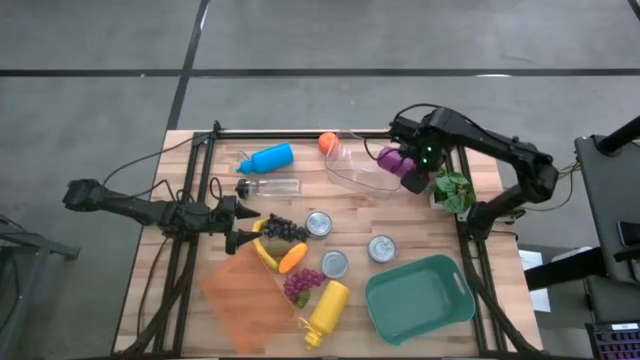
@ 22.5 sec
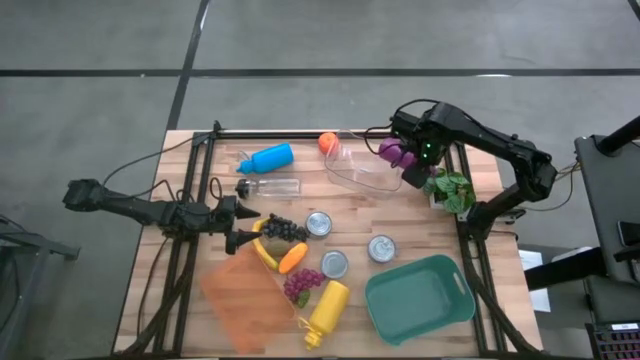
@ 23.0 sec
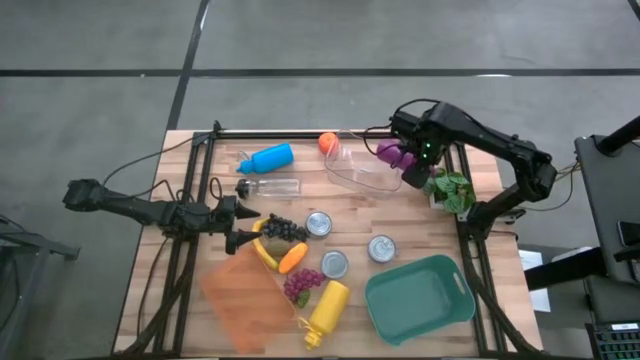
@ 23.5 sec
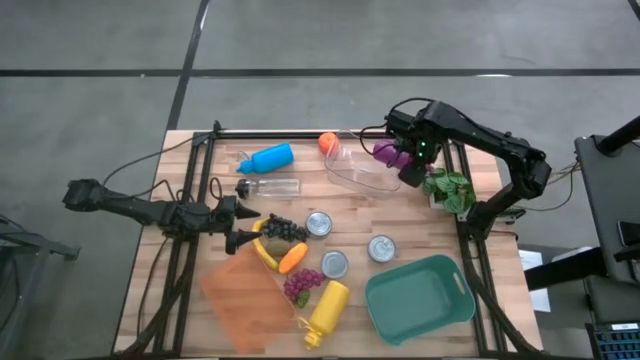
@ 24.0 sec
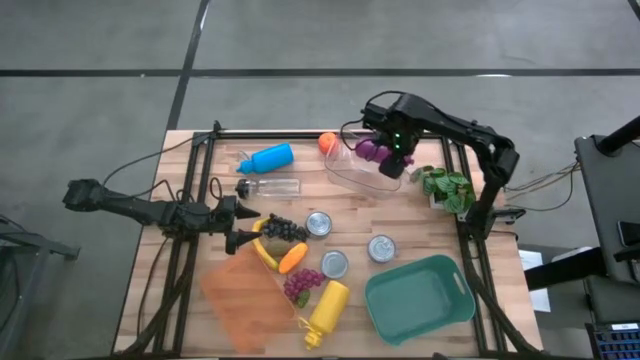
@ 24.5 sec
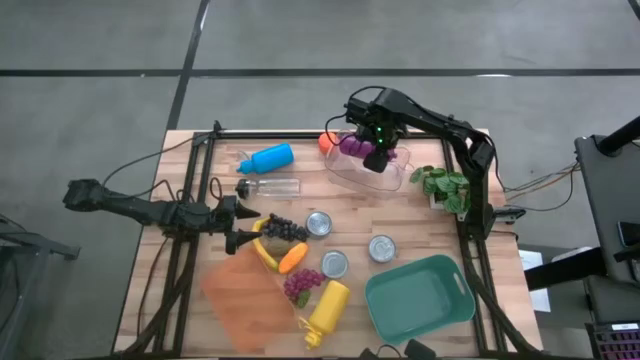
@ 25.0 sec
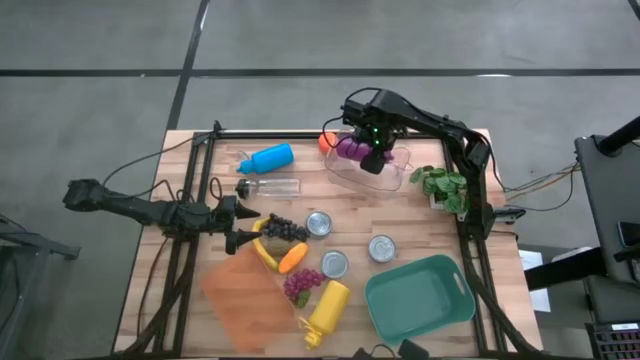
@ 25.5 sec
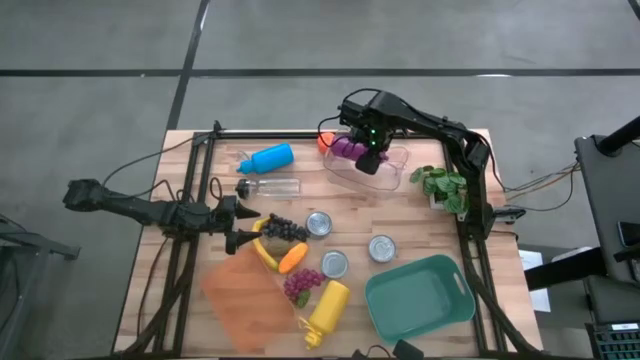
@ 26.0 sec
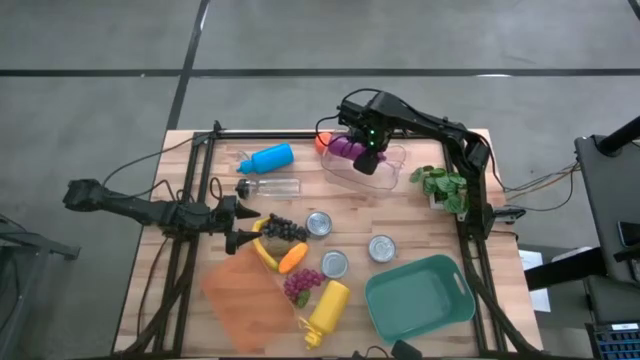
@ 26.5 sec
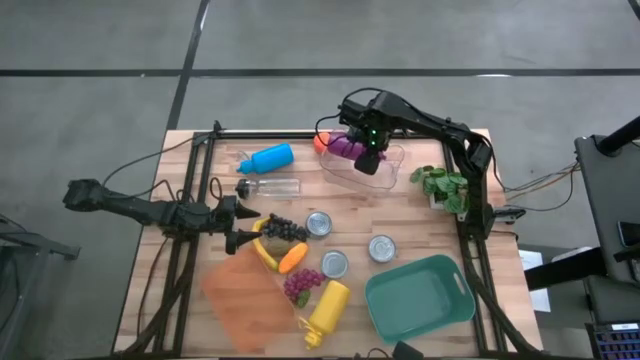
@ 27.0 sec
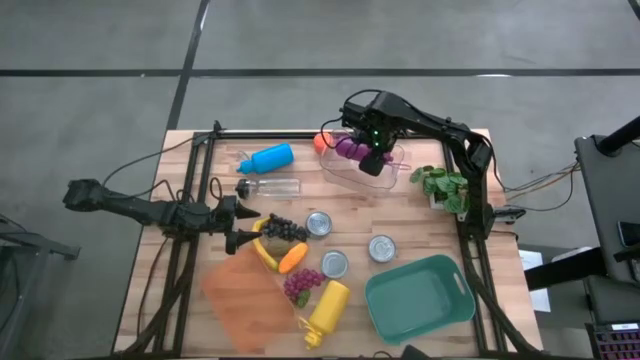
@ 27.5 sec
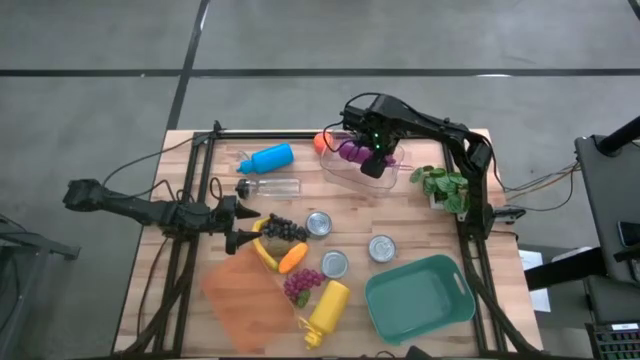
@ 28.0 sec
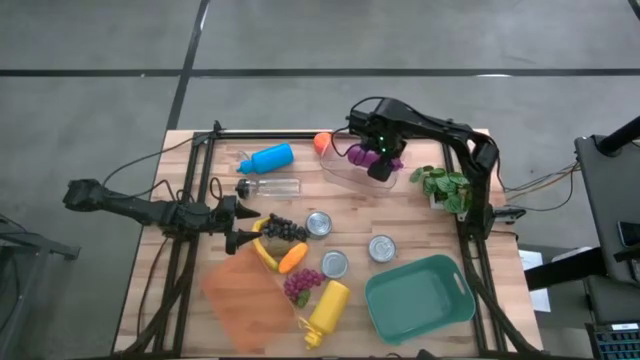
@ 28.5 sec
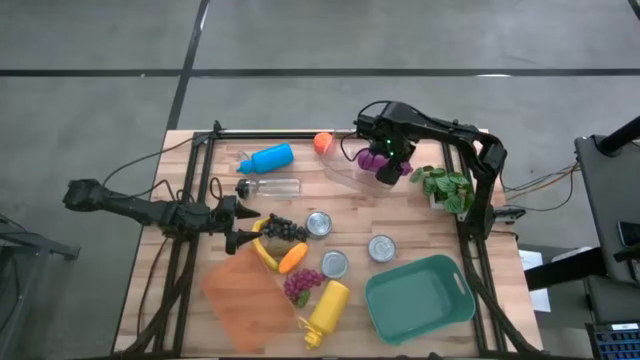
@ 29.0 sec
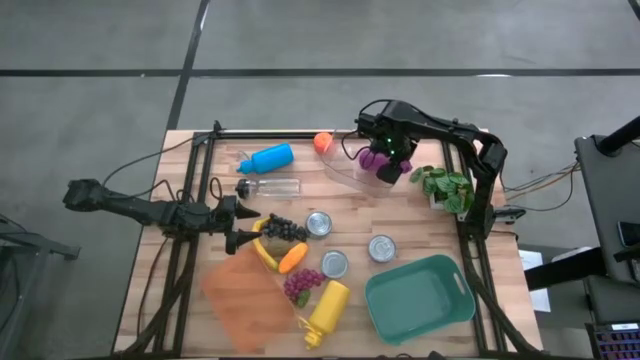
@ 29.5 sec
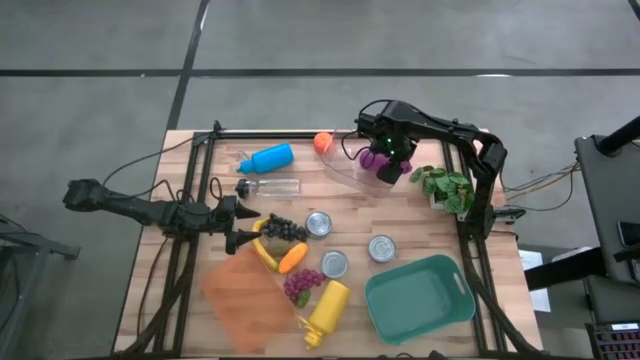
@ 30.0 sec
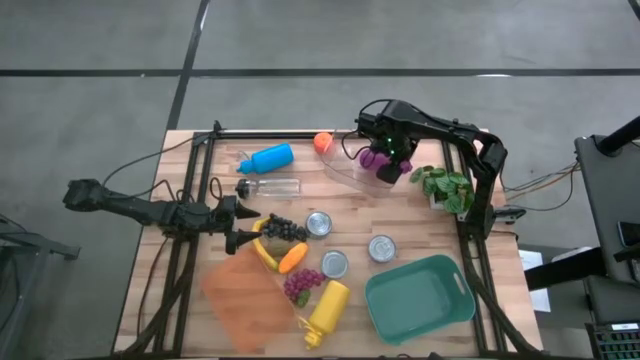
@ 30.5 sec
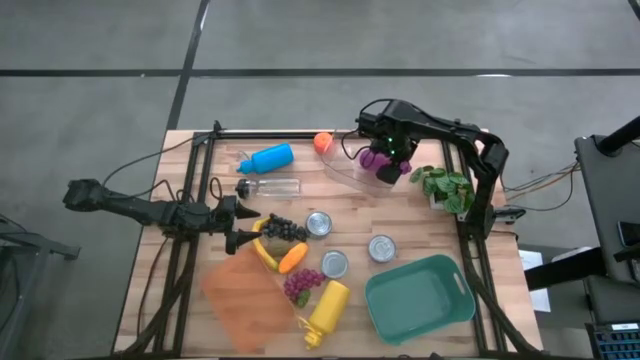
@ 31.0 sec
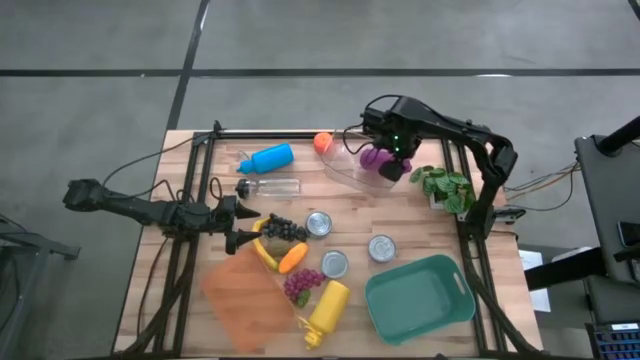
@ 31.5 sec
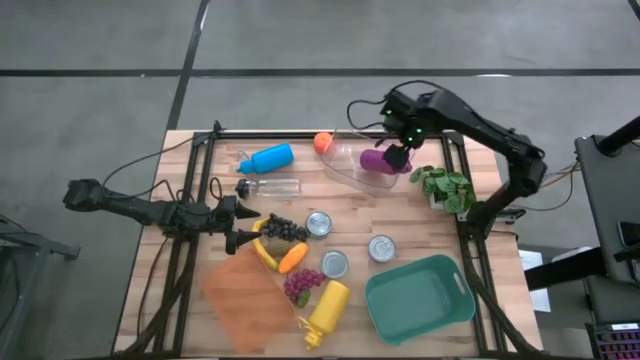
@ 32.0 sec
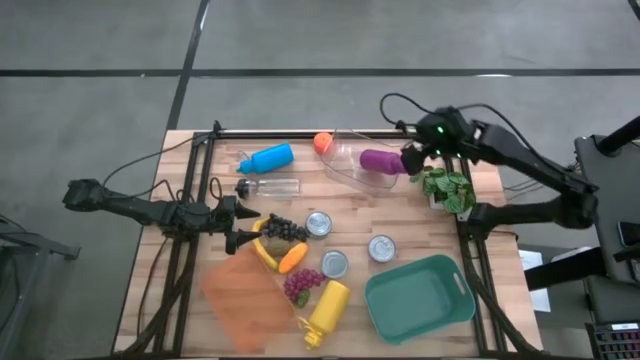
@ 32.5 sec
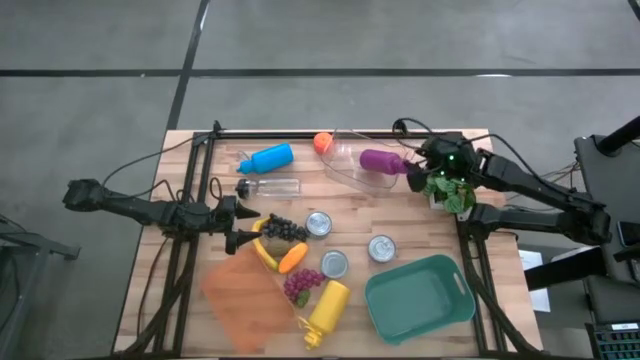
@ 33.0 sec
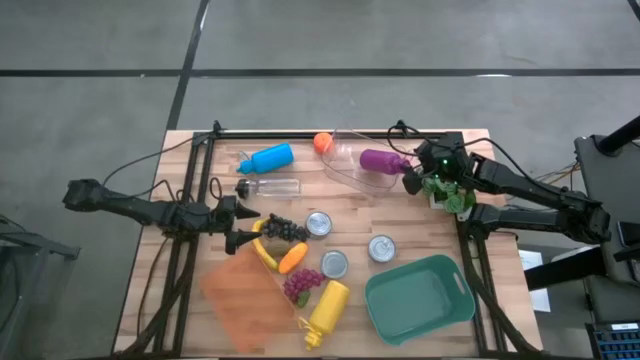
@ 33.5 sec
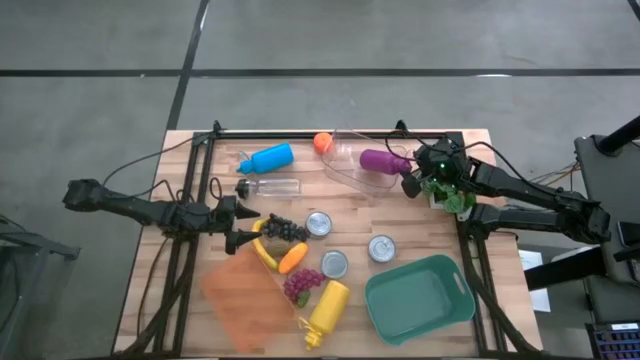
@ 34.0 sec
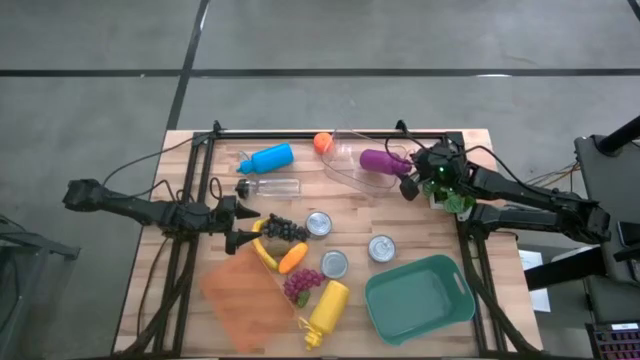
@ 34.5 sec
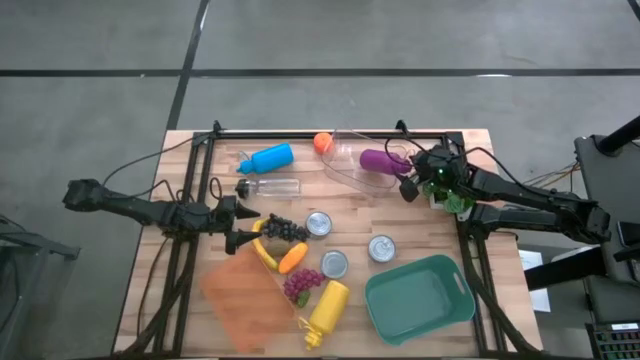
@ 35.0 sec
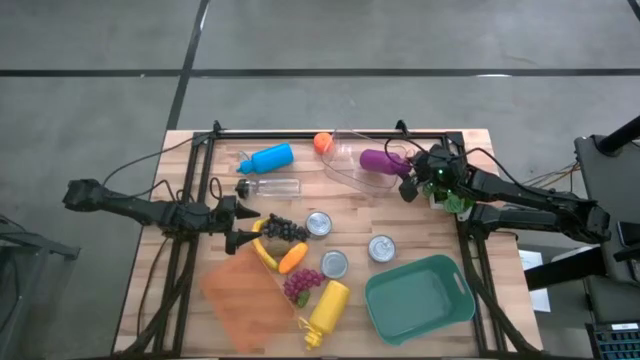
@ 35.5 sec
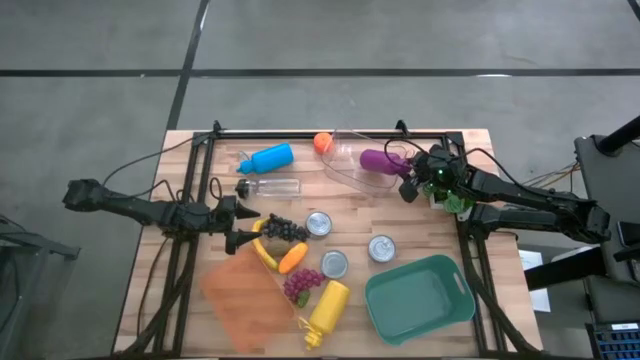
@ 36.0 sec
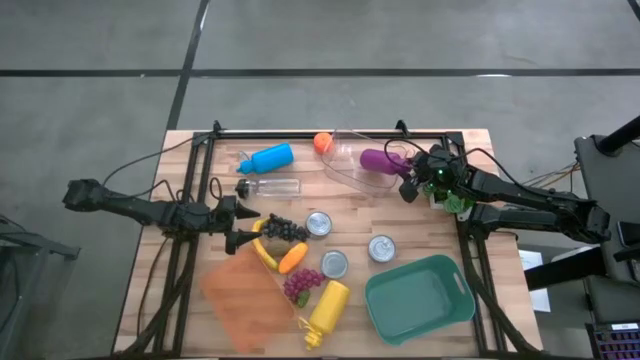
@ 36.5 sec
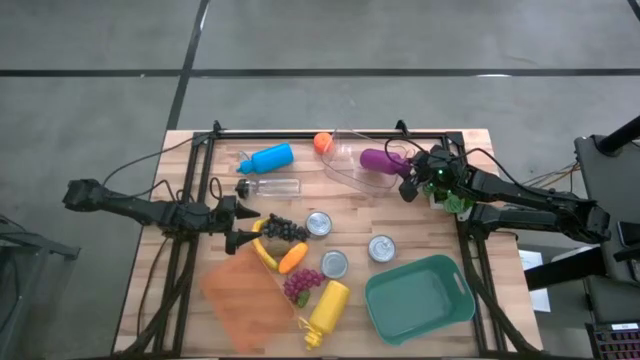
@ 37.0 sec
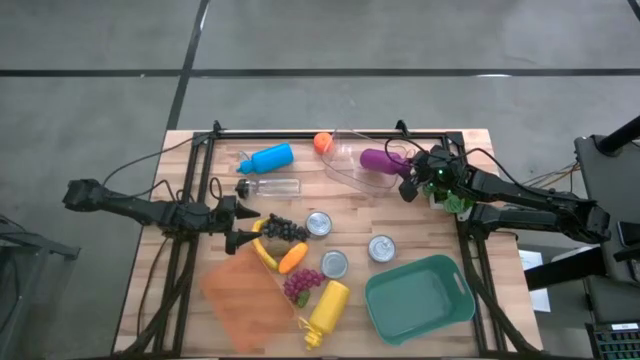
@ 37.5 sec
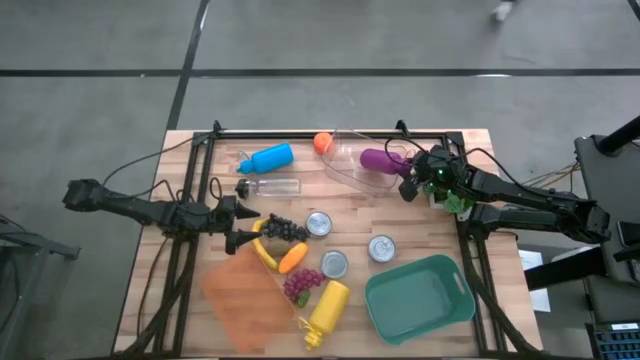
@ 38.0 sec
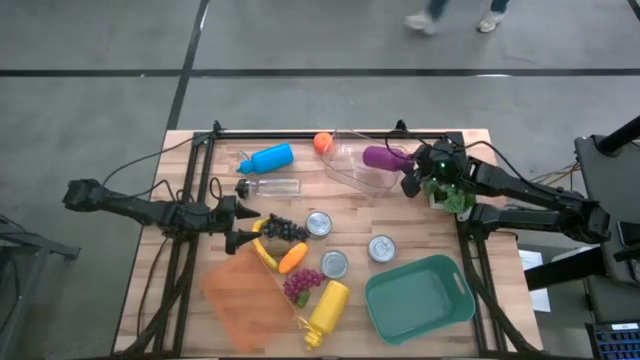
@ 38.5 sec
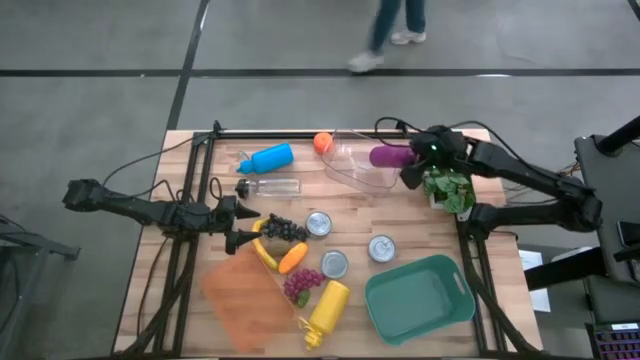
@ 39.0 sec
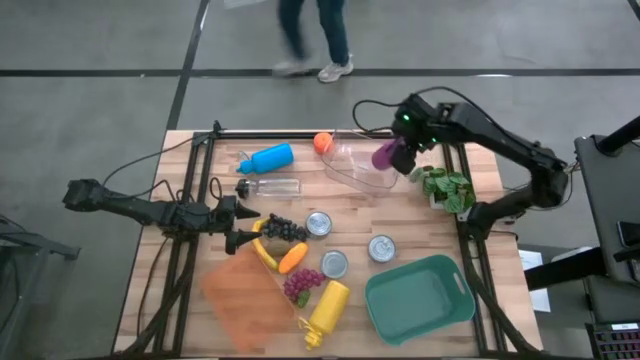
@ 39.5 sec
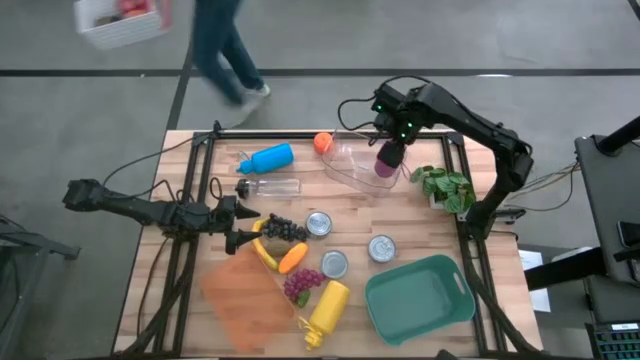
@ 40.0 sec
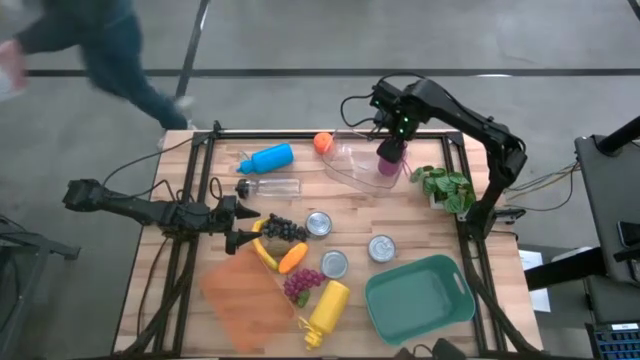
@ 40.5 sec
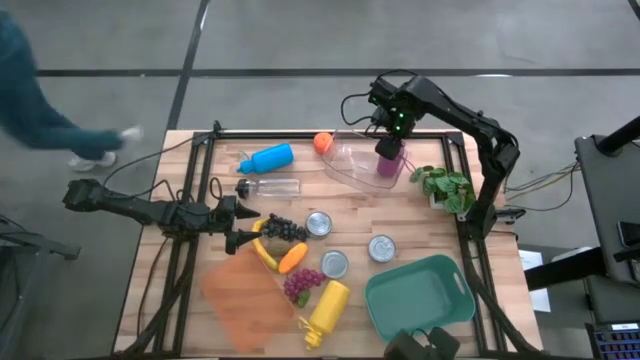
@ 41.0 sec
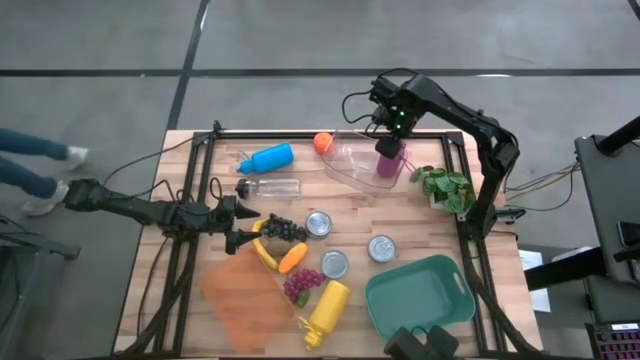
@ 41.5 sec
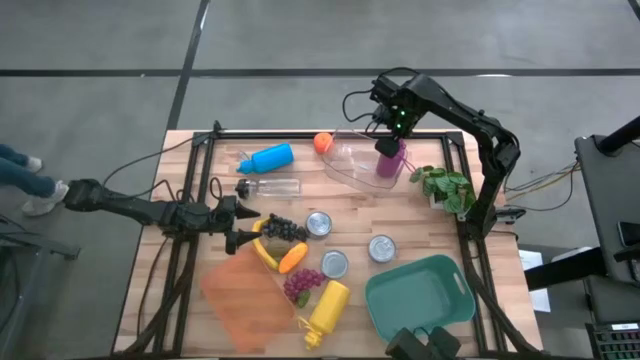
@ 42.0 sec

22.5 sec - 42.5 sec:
Task: Pick & Place Food Item
Put the purple water bottle into the transparent bin
